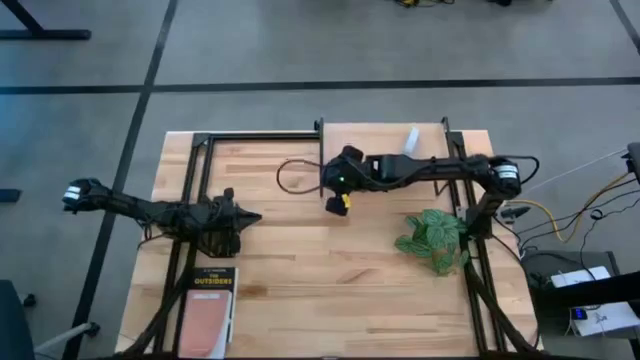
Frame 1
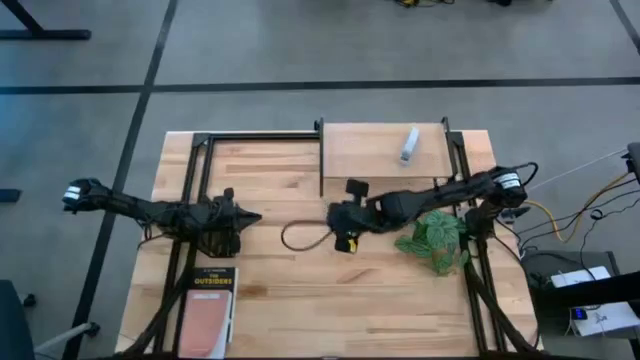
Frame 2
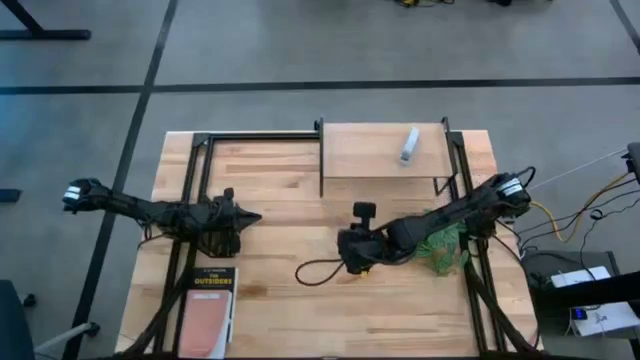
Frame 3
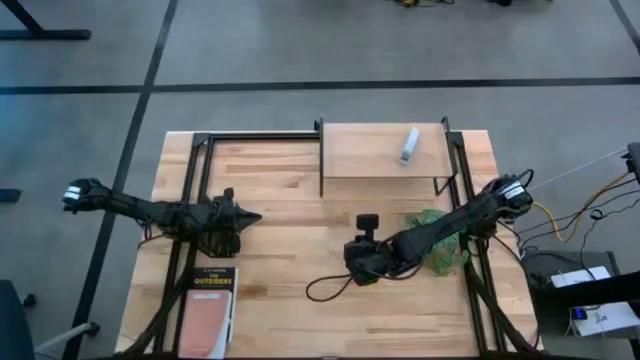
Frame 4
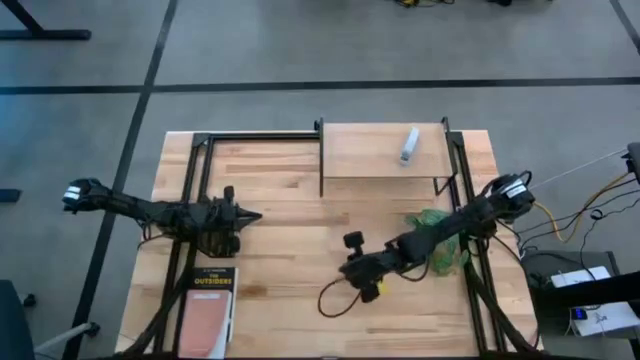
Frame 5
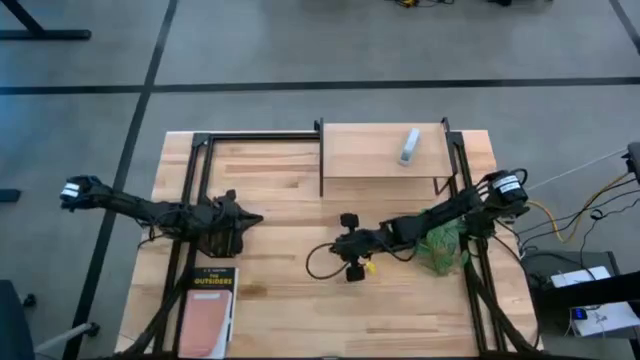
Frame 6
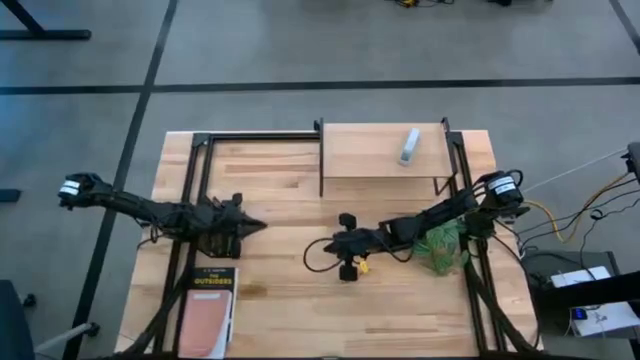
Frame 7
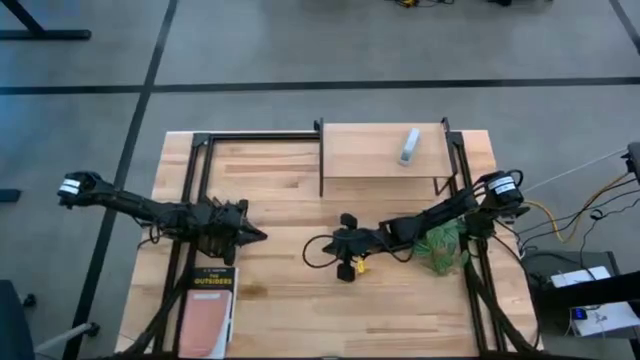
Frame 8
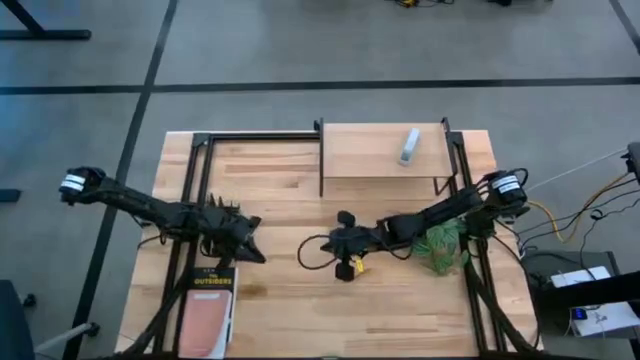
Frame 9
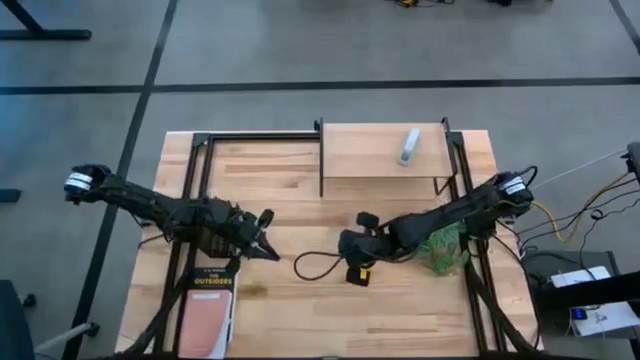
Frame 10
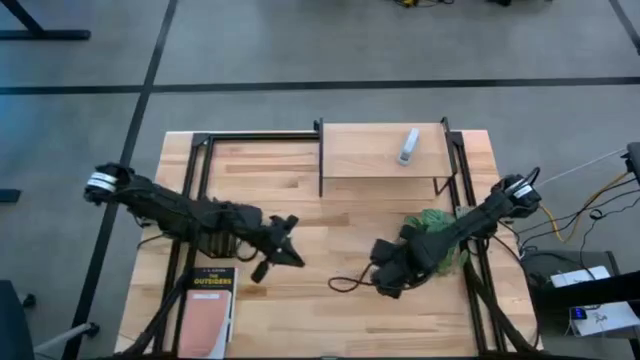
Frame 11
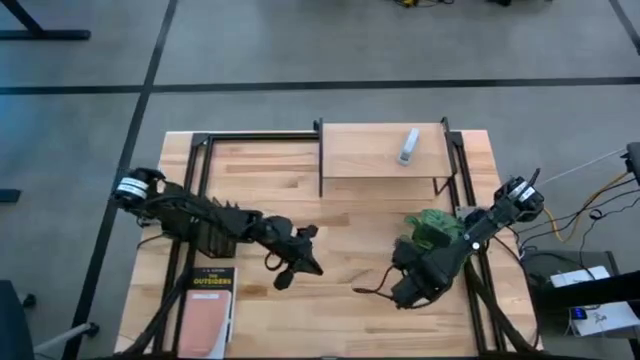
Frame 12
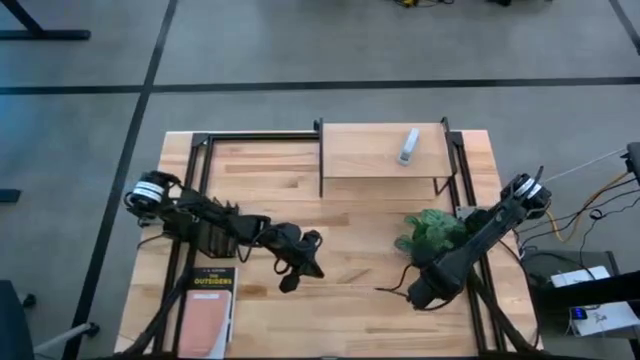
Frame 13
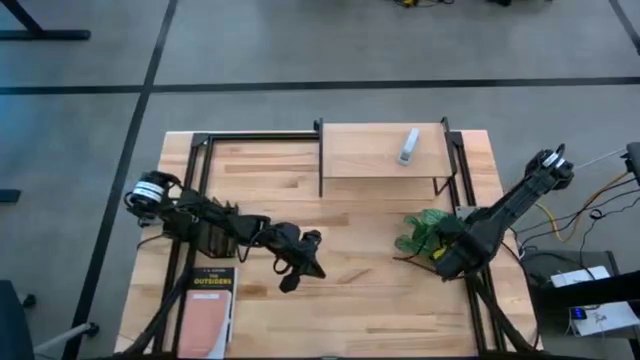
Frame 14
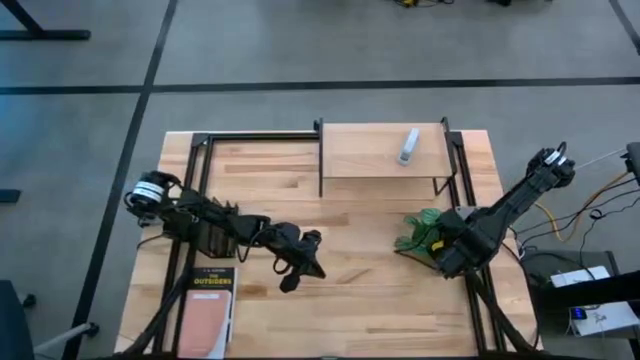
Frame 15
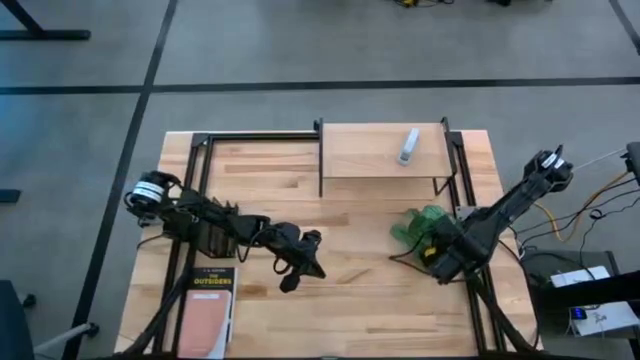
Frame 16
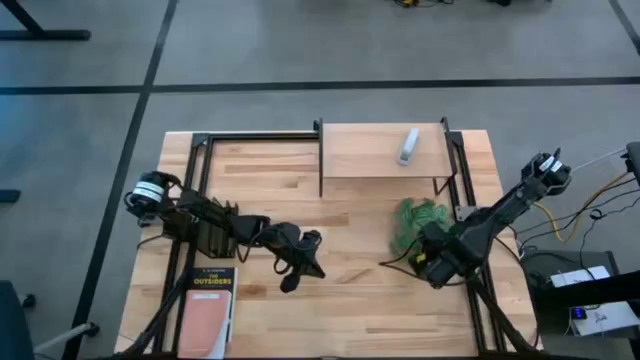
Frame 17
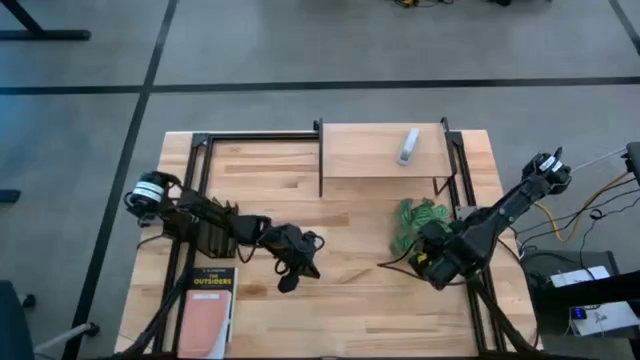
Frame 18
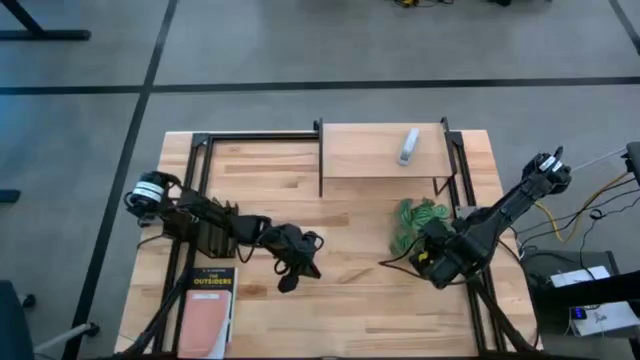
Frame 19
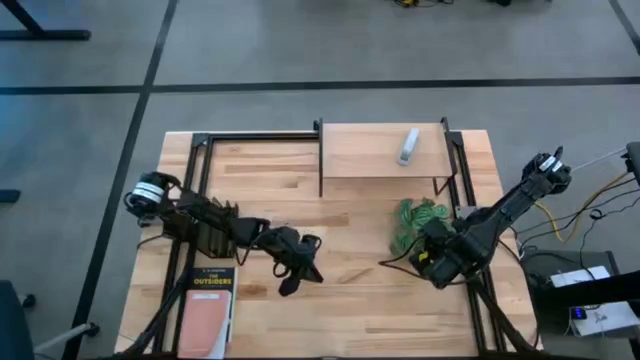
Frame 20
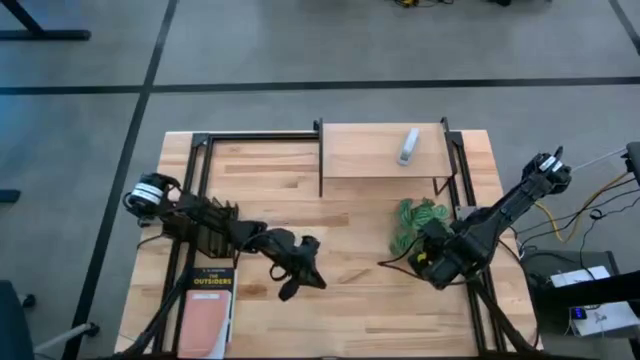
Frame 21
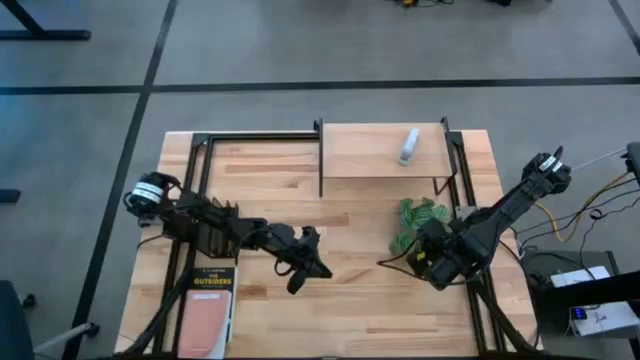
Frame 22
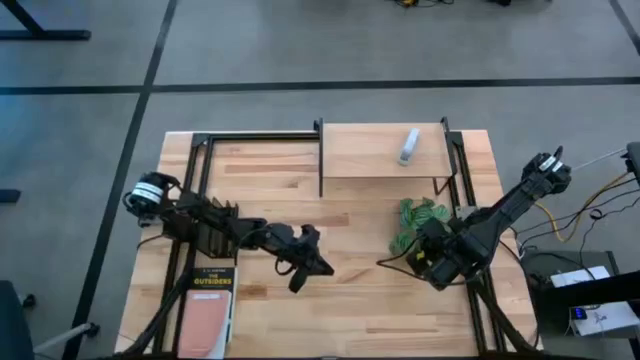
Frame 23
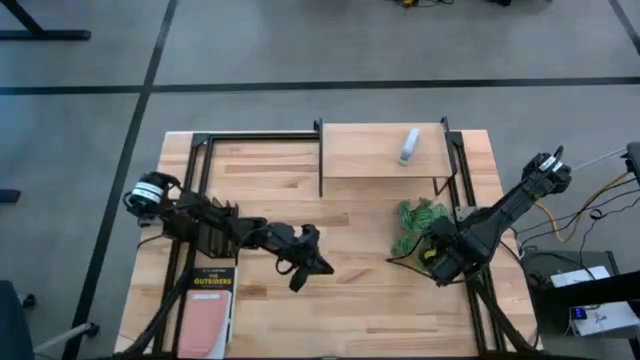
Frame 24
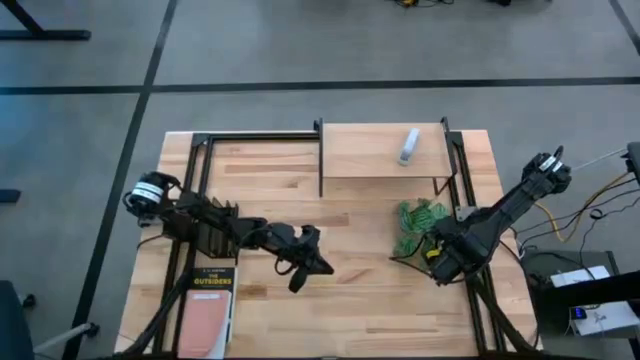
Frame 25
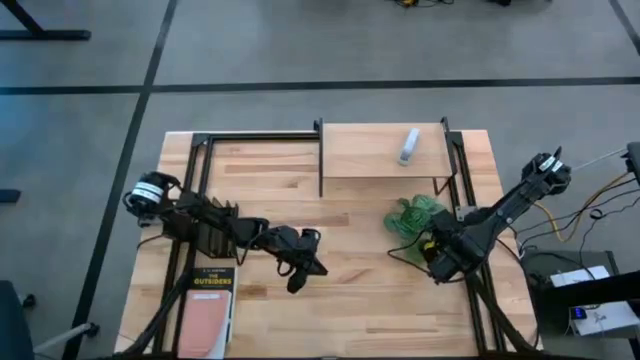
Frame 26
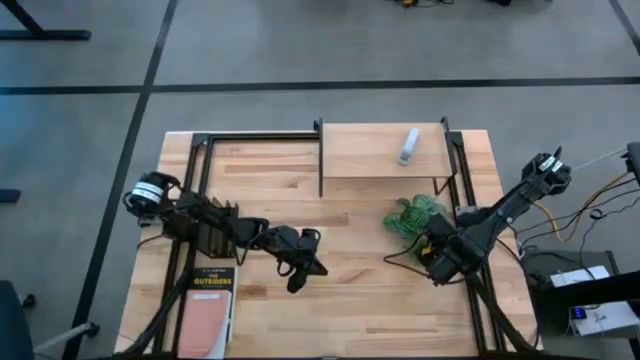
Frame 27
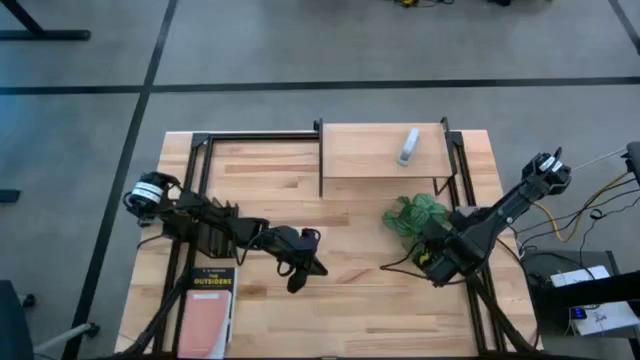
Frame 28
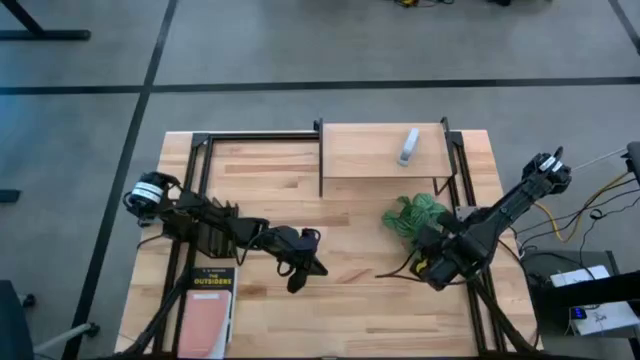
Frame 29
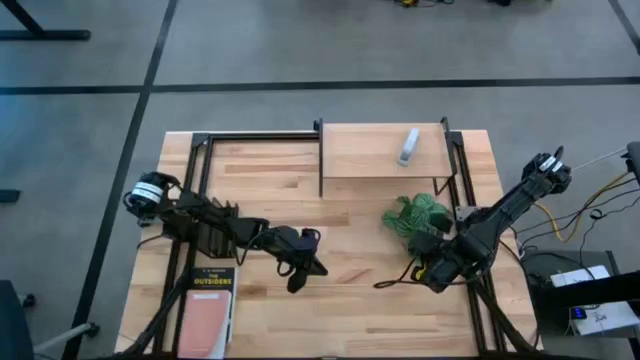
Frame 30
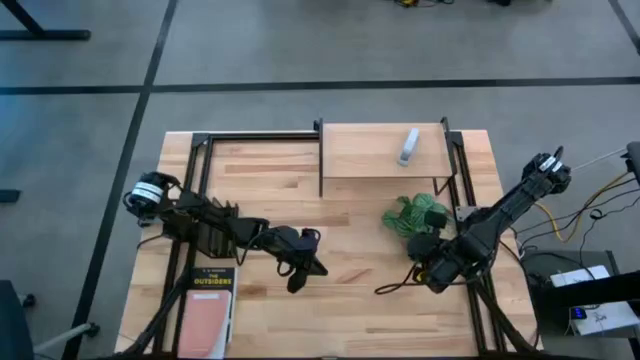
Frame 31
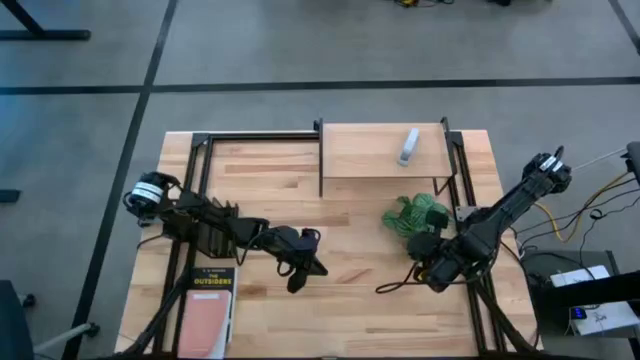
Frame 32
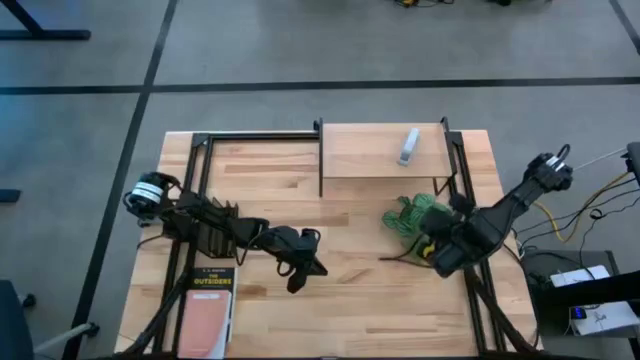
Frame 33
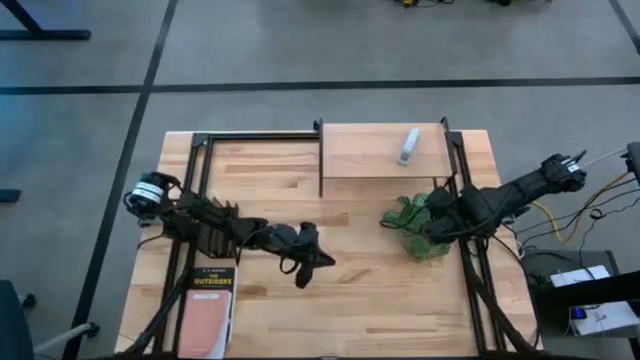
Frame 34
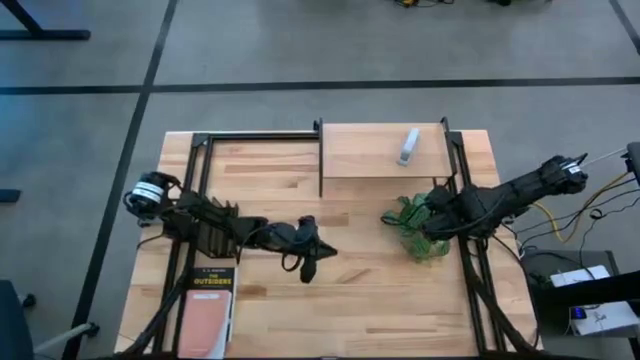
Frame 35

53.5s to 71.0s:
Task: Stock shelves
Put the white vase plant under the shelf

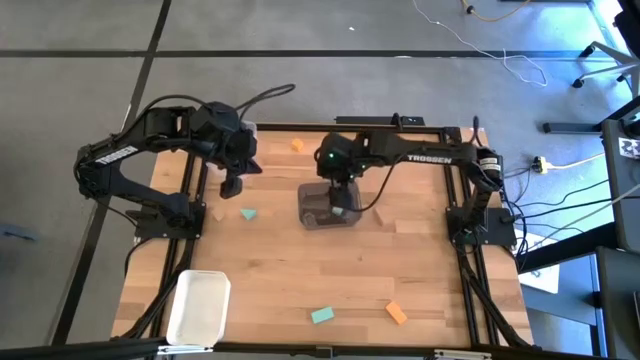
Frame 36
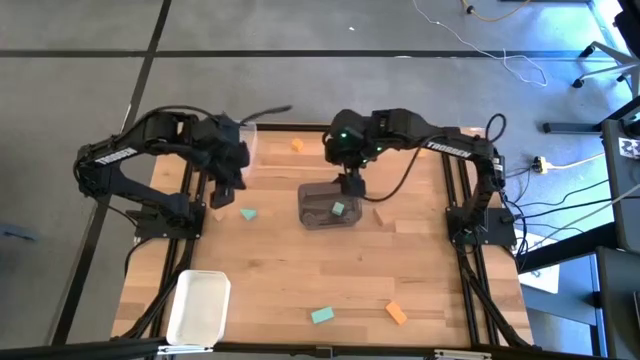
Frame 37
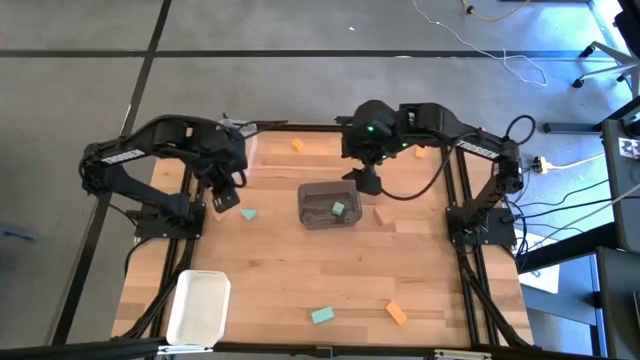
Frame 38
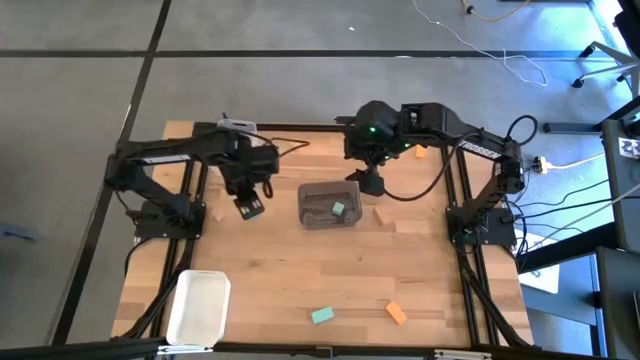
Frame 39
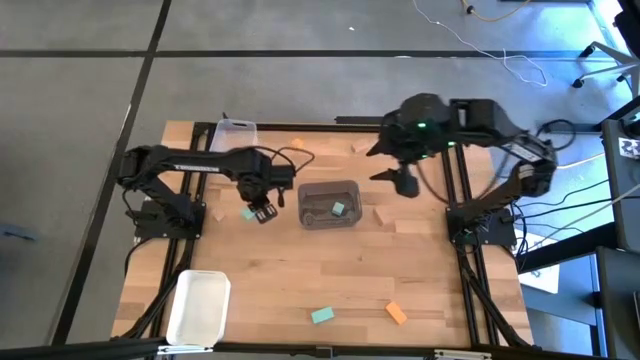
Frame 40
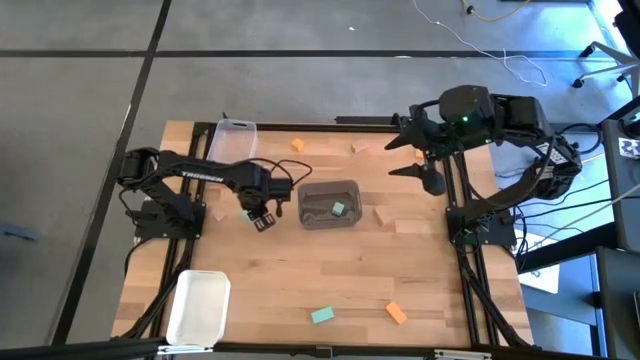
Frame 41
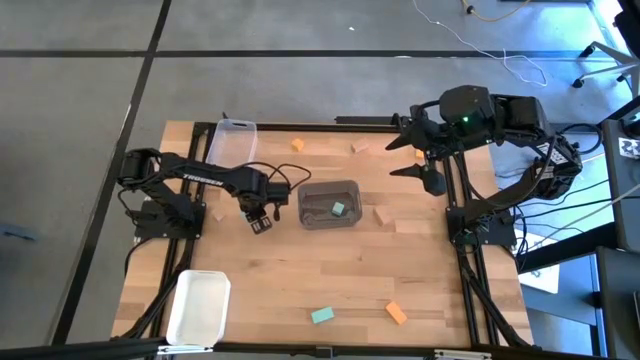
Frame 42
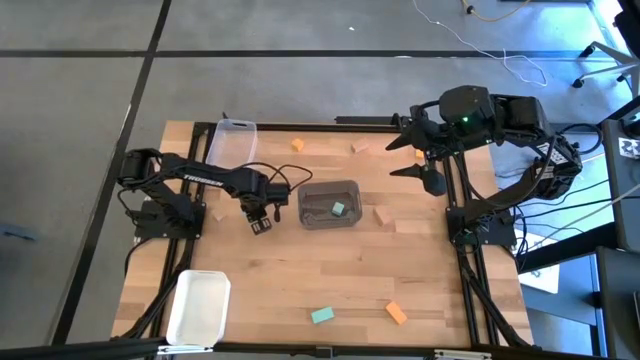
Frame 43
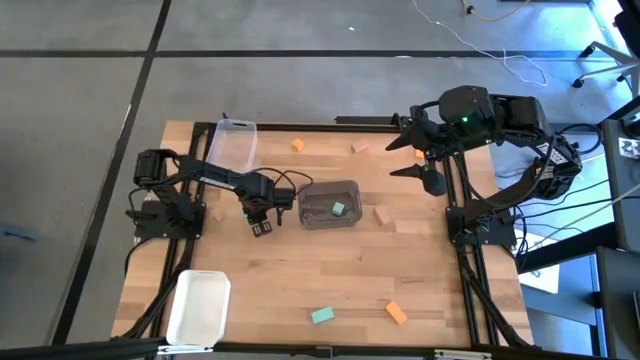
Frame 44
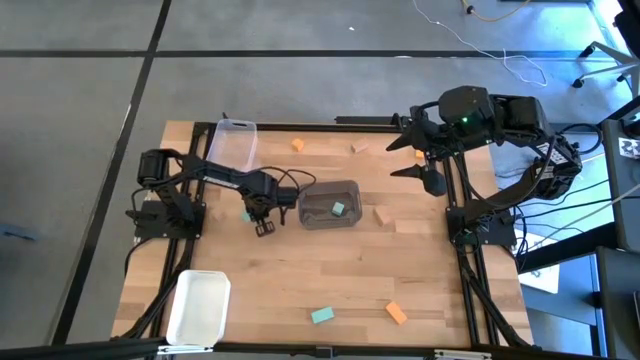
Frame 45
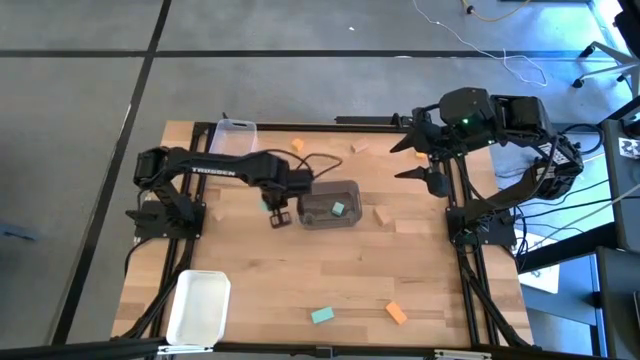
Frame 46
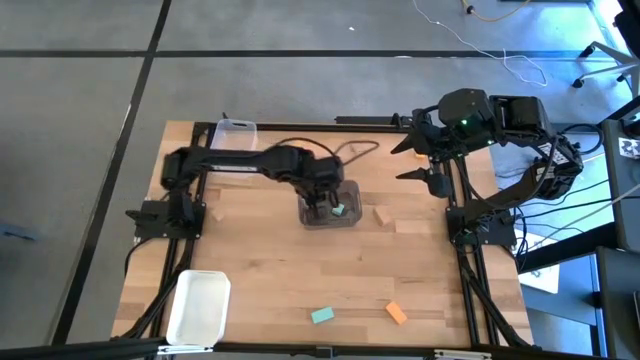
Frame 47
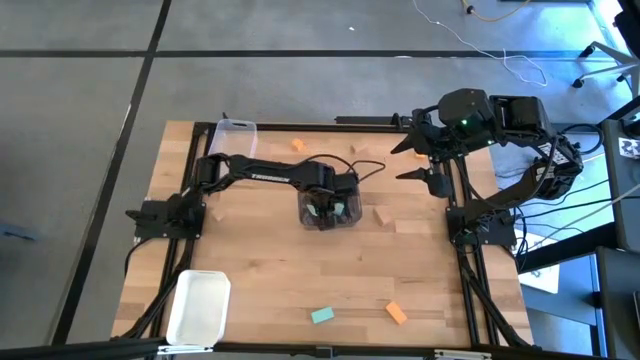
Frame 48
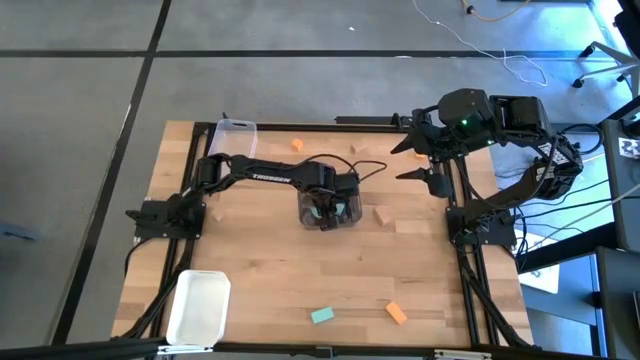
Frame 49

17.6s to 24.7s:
Task: Sort & place blocks by color
Put the top light blue block into the black transparent bin
